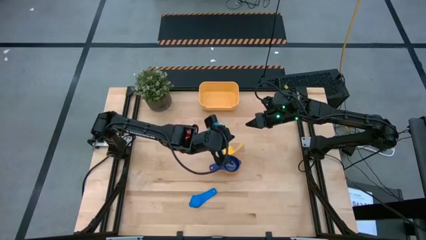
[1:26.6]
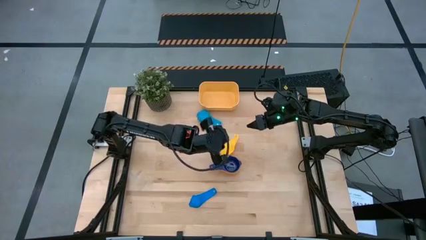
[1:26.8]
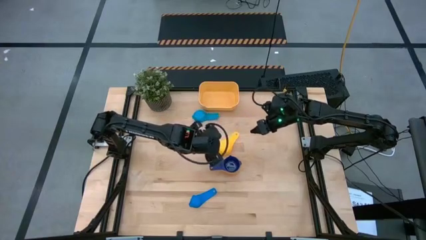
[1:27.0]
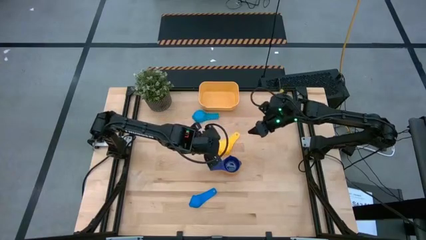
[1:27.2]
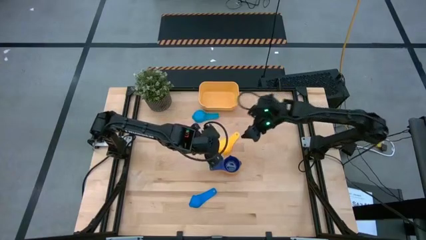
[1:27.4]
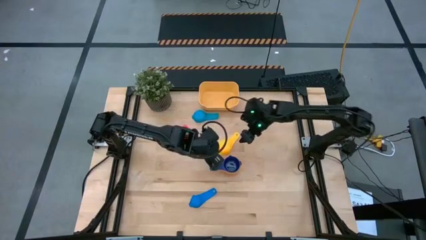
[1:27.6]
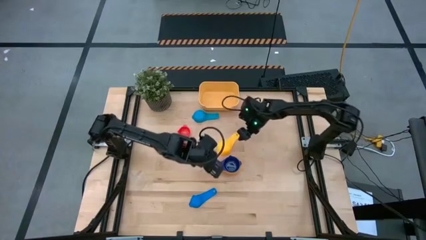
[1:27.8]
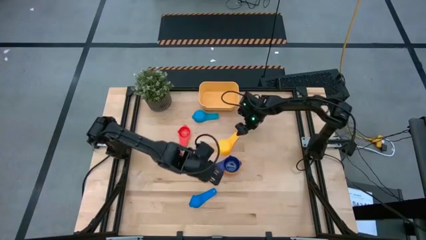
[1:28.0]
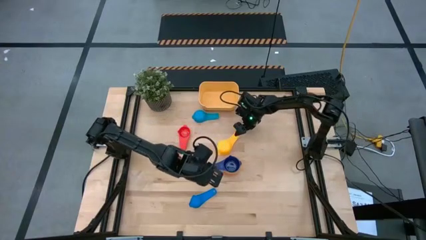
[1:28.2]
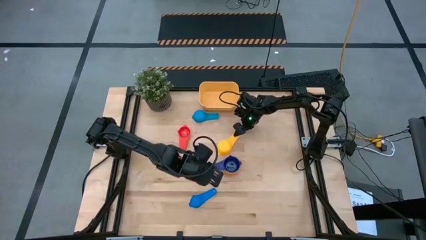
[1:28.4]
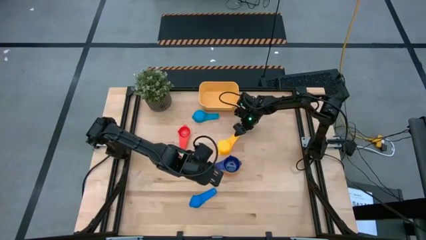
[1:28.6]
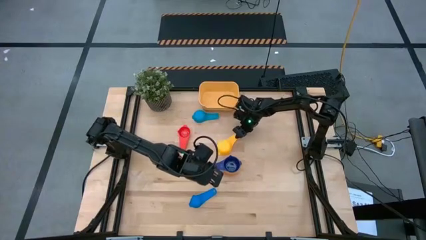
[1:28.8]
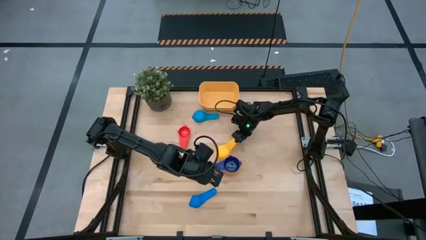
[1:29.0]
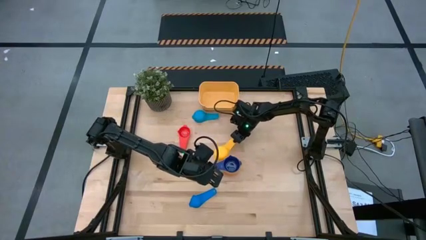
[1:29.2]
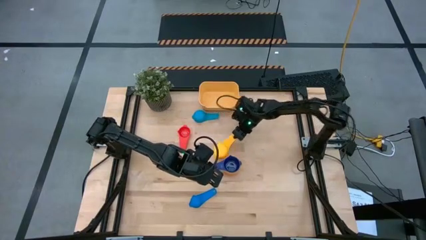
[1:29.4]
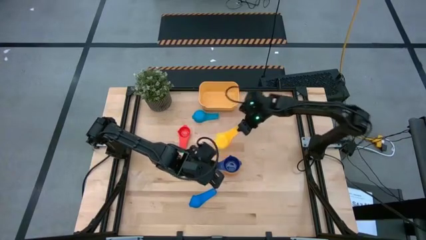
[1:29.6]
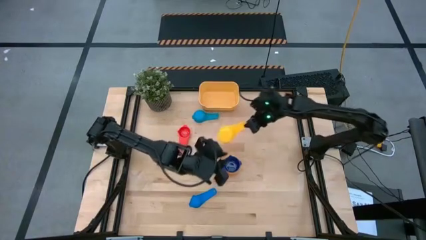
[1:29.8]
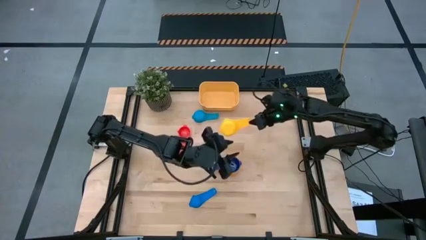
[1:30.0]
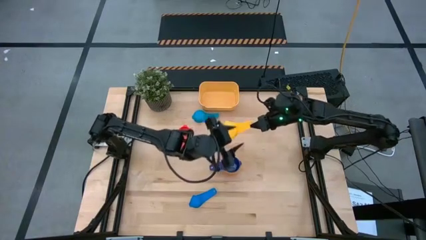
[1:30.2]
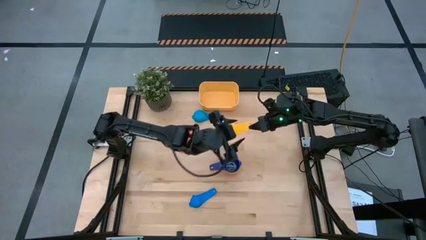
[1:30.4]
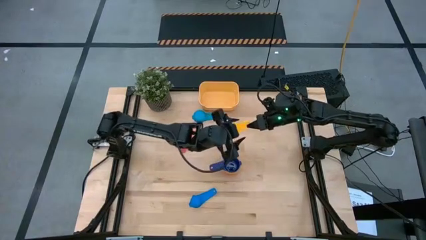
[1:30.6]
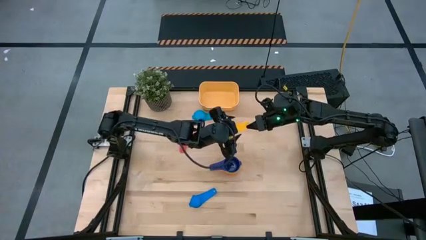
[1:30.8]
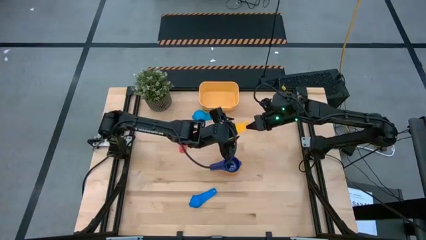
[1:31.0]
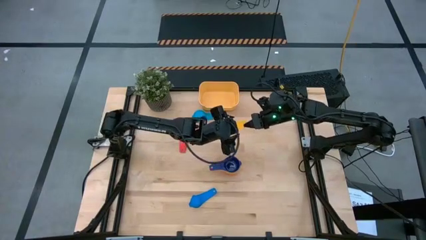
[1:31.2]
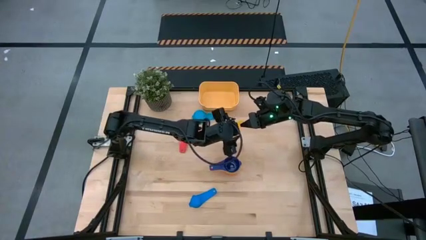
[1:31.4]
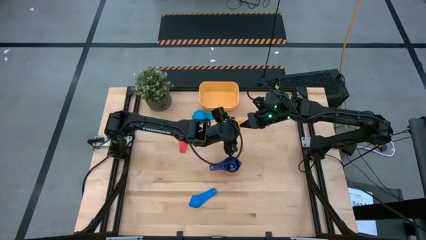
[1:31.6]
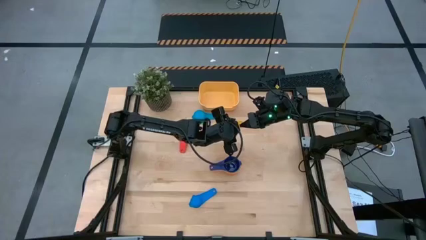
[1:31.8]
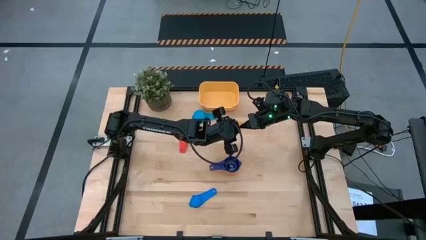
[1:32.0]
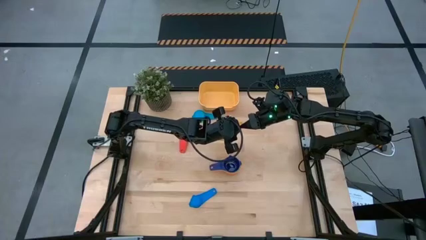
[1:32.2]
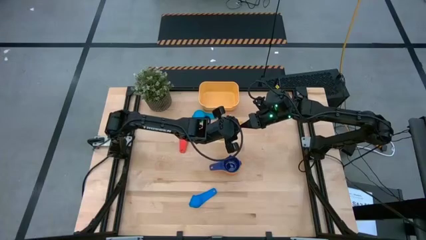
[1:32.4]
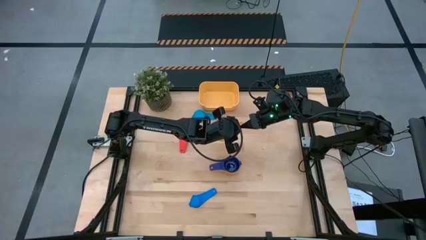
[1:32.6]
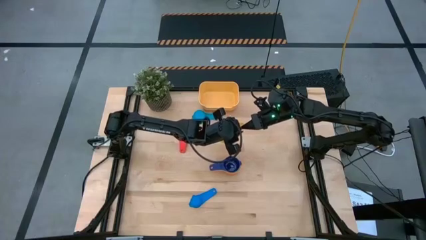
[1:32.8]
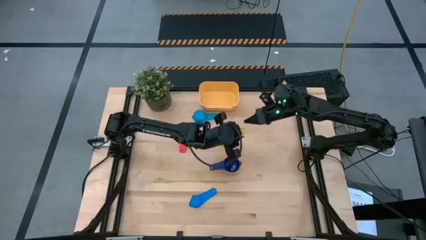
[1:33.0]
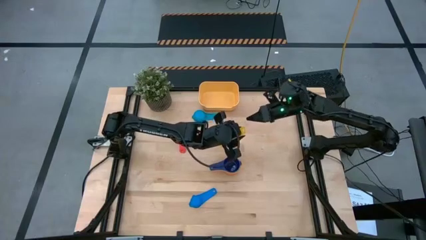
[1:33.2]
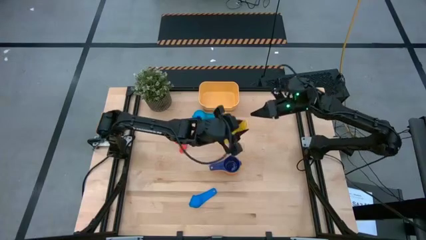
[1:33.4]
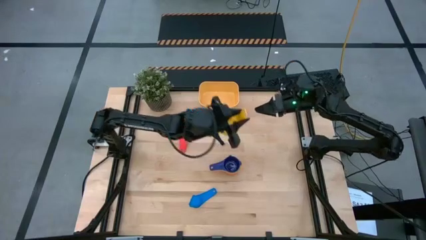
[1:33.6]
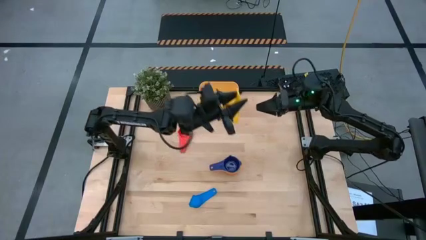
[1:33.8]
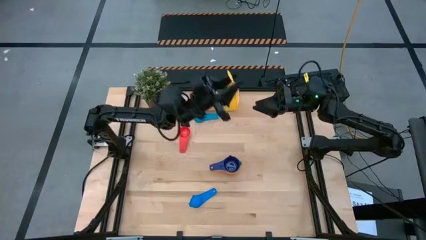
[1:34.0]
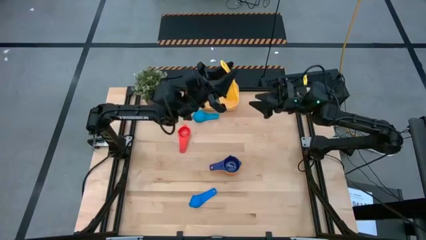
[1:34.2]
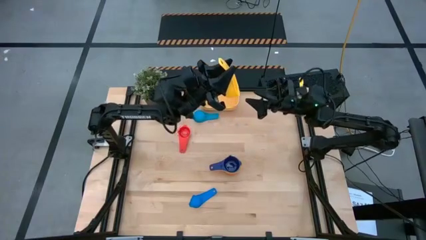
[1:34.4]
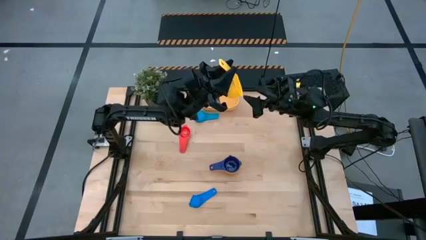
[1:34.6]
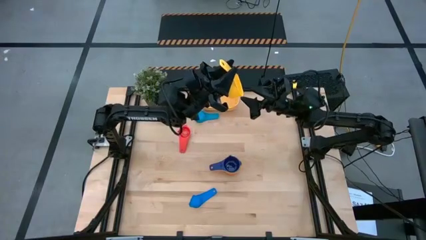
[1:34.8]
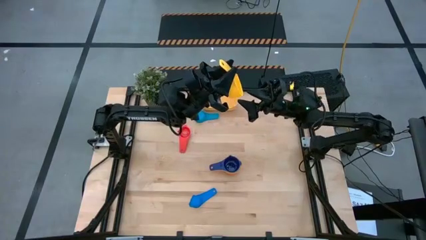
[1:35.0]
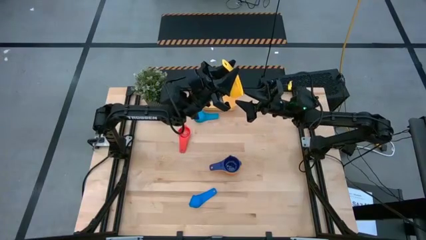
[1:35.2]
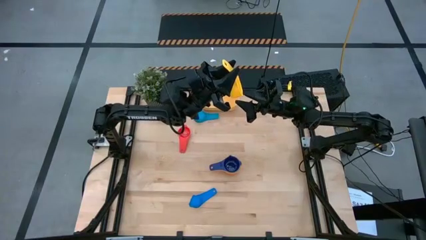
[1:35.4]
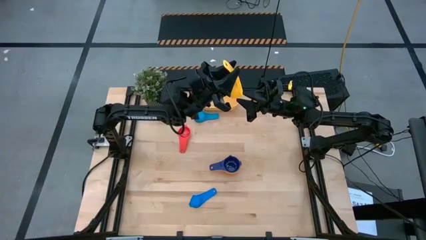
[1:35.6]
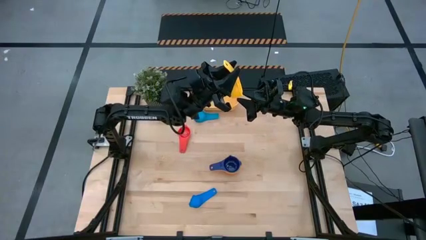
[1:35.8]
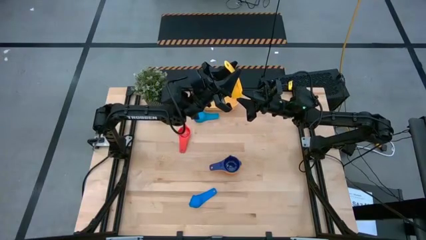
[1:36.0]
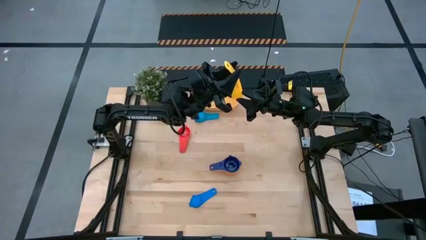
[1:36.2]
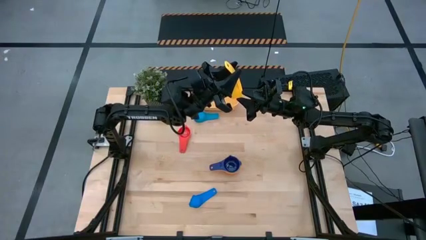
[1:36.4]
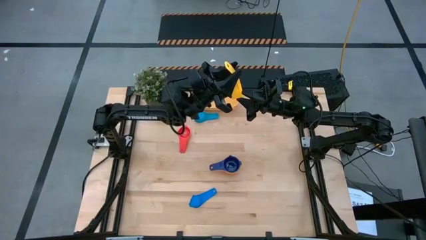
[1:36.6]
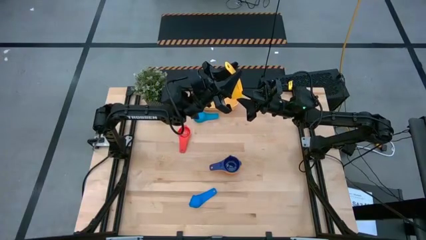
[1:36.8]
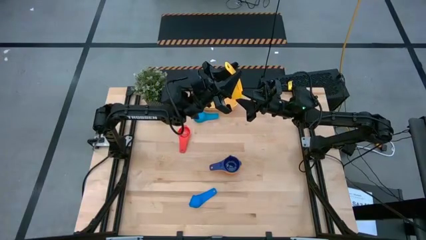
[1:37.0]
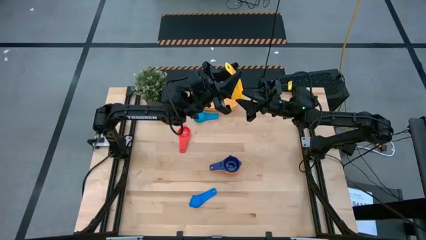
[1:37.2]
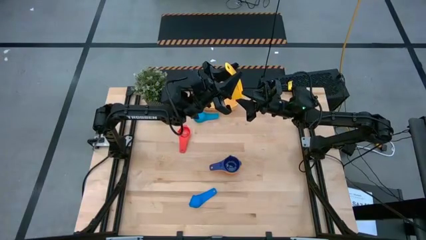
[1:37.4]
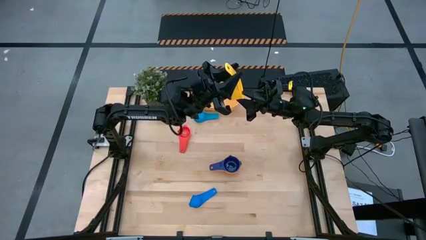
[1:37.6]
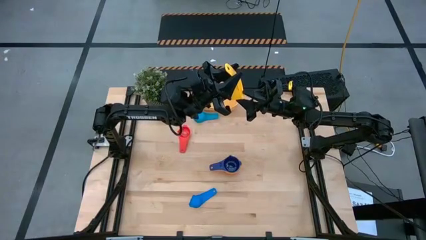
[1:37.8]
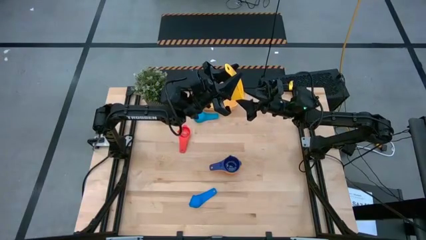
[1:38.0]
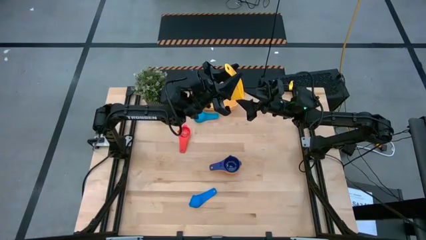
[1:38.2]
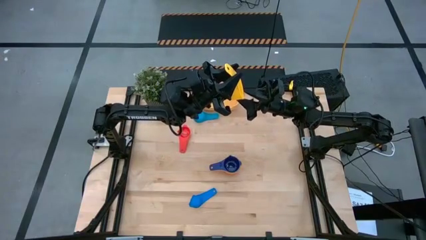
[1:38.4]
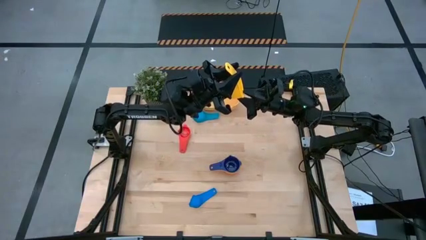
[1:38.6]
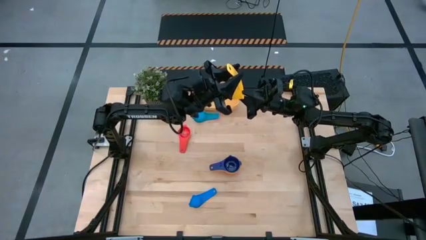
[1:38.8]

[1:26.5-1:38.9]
Task: Nest measuring cups in basket
Stack the yellow measuring cup on top of the dark blue measuring cup

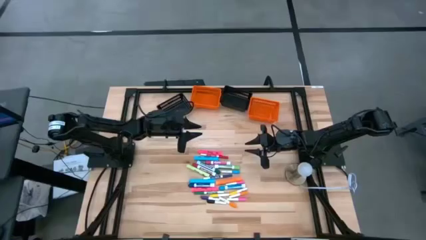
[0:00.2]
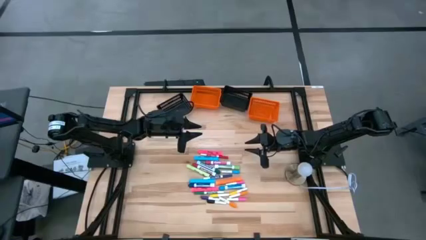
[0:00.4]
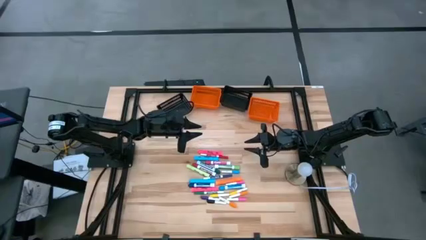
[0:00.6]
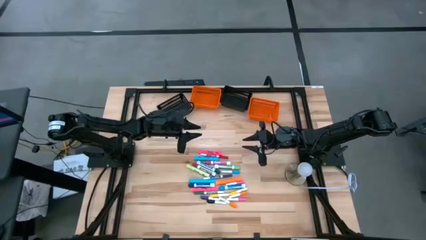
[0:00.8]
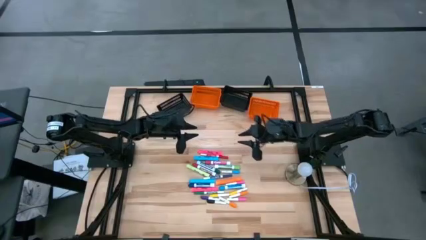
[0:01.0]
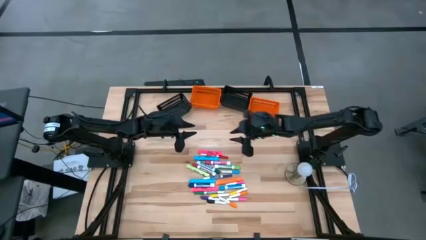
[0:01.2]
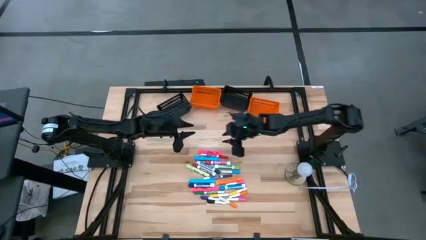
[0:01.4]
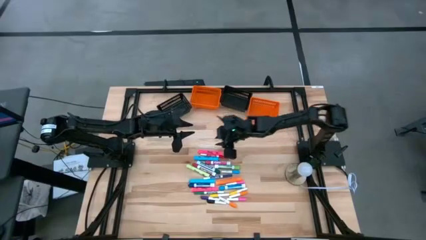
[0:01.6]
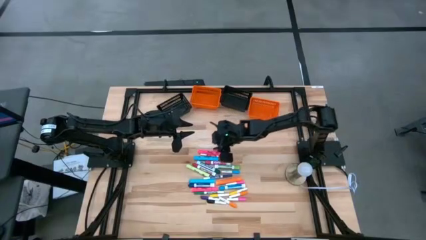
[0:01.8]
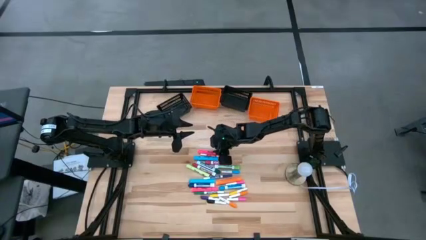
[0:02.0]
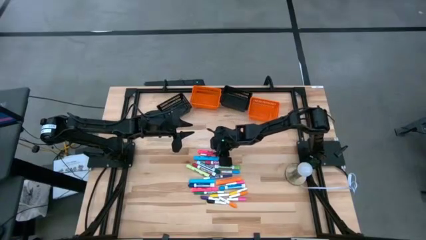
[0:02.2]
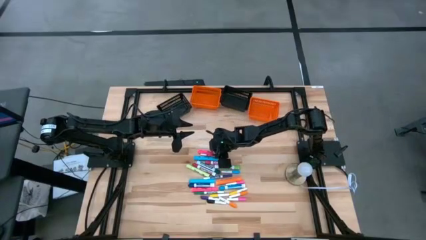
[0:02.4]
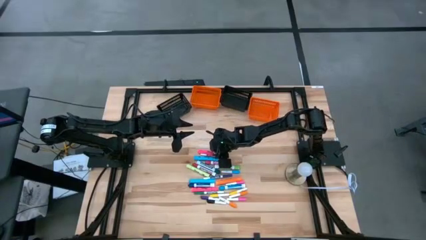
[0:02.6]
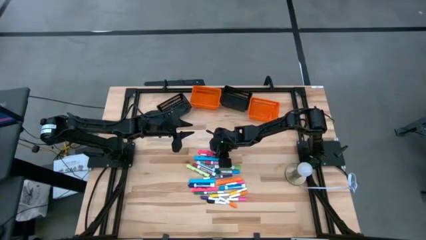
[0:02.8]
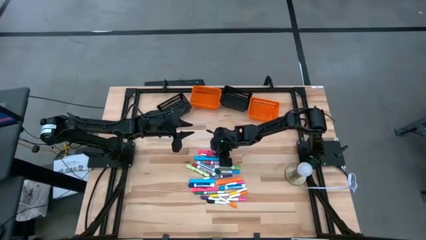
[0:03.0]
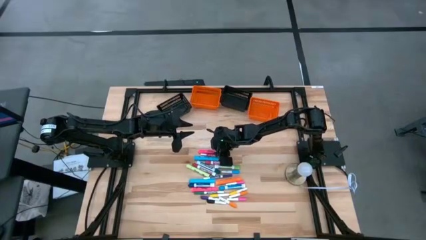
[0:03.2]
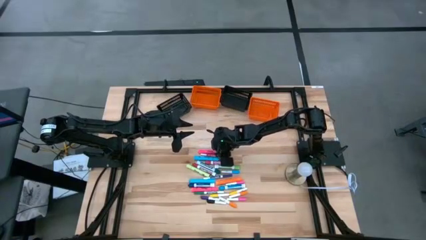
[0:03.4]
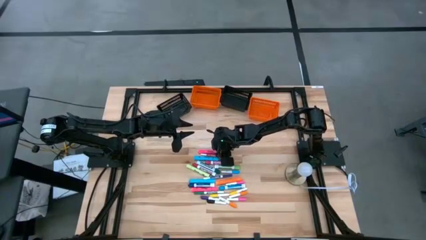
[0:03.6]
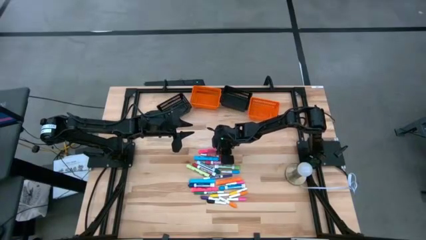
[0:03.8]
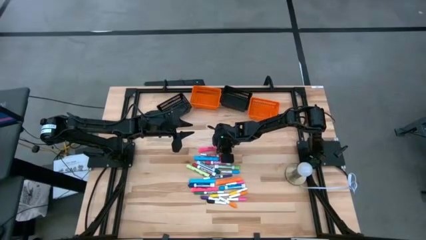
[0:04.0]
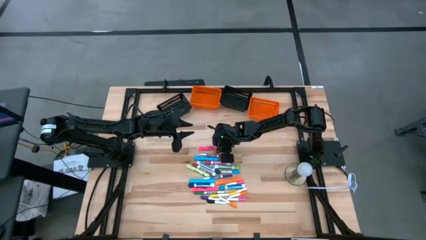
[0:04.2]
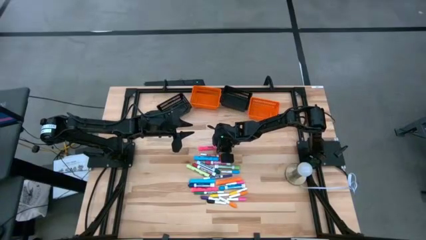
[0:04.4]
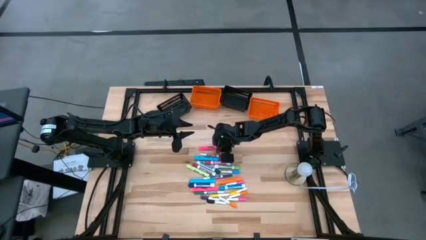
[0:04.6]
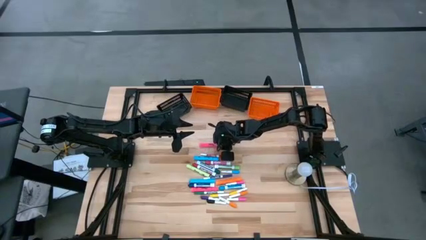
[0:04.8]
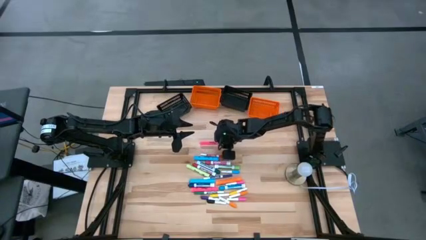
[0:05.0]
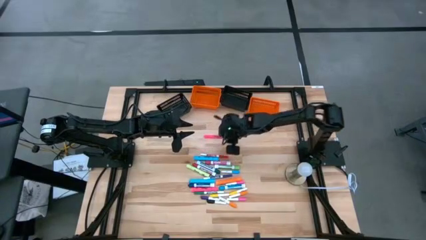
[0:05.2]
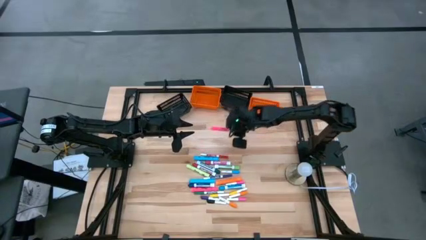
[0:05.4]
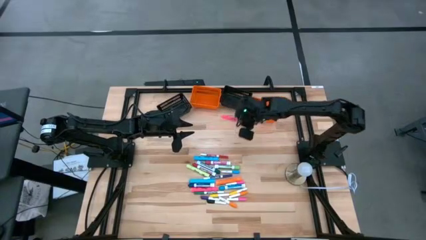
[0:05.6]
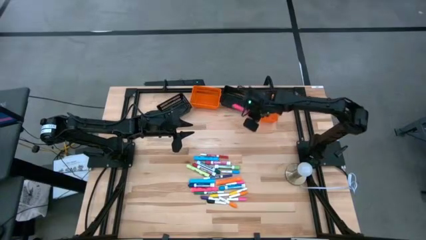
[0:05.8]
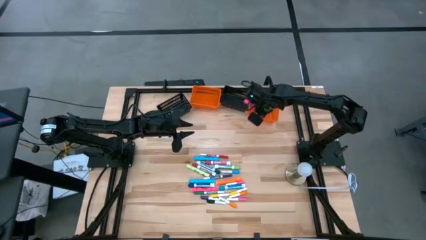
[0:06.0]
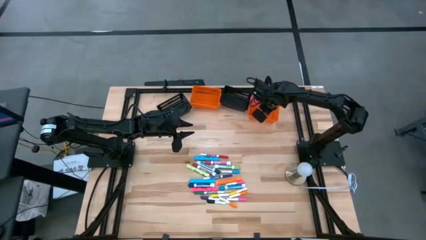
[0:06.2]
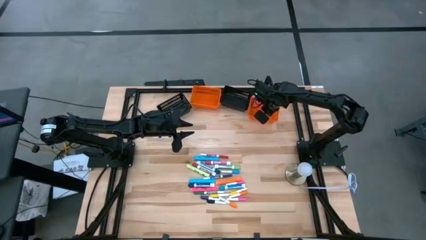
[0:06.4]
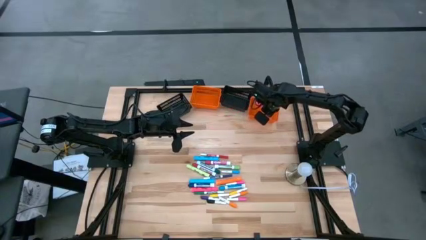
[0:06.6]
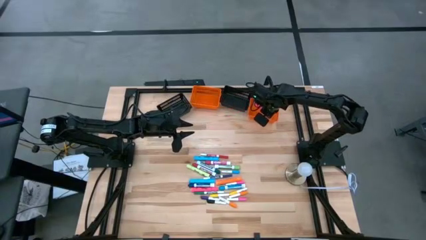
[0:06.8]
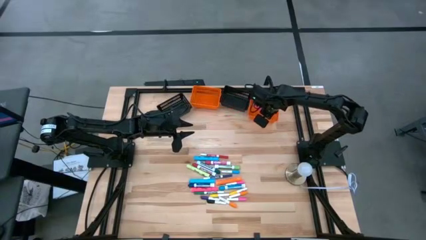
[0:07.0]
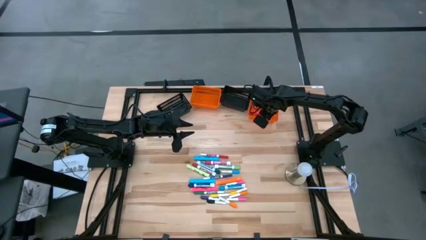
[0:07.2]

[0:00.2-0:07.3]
Task: Pick & Place Markers
Put the large pink highlighter into the right orange bin
